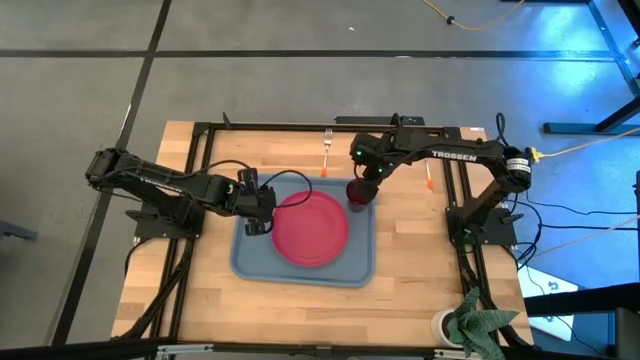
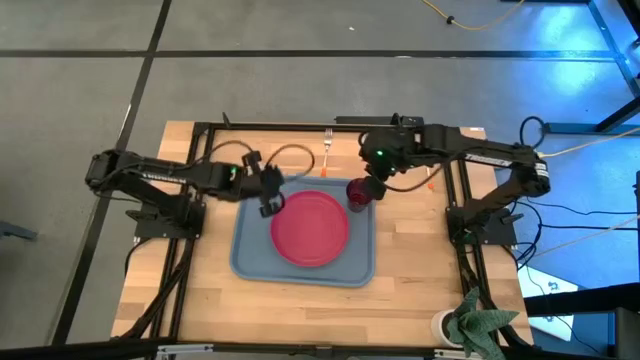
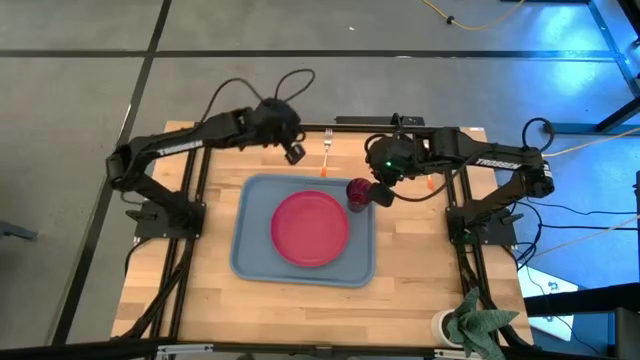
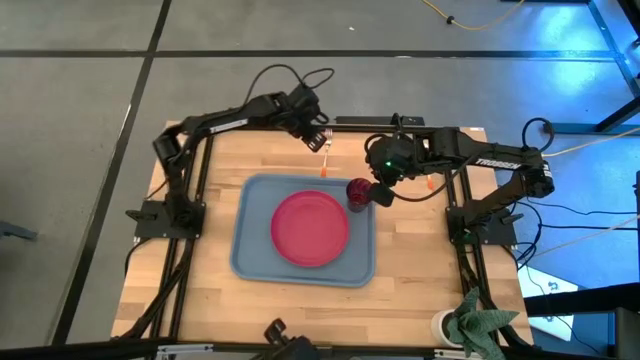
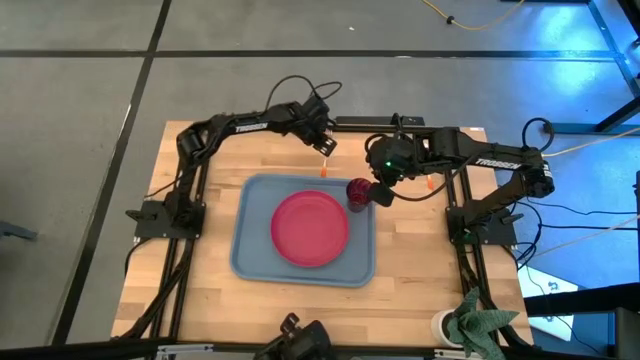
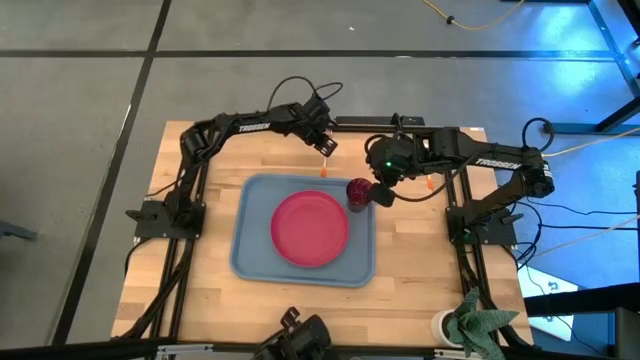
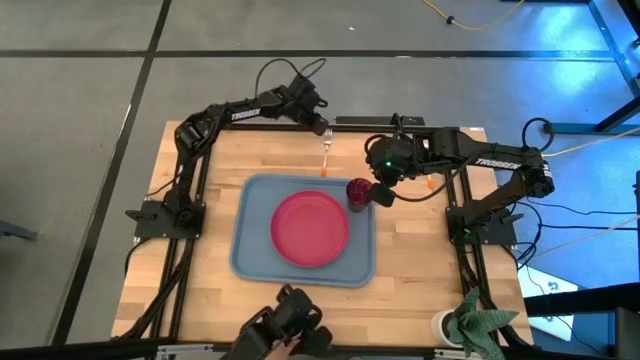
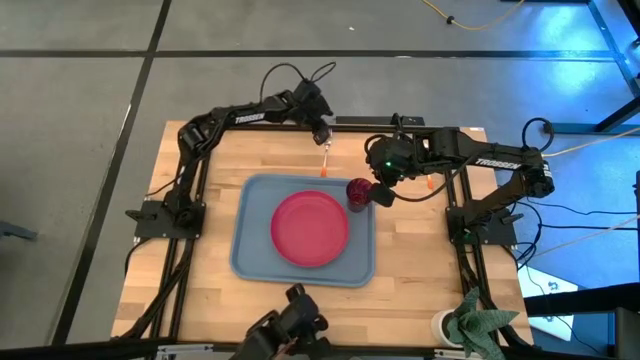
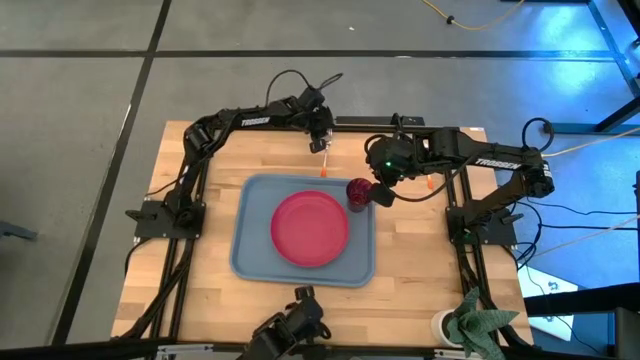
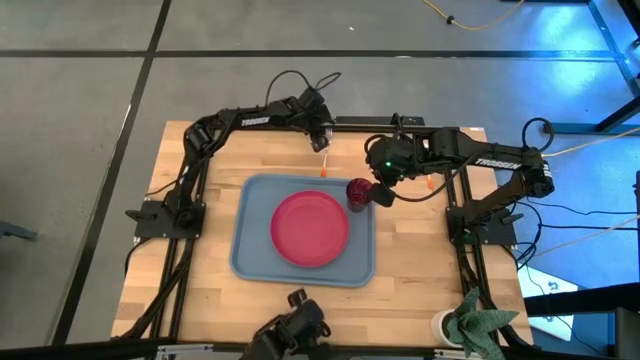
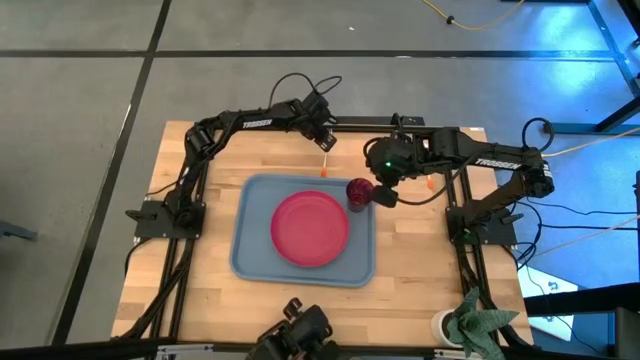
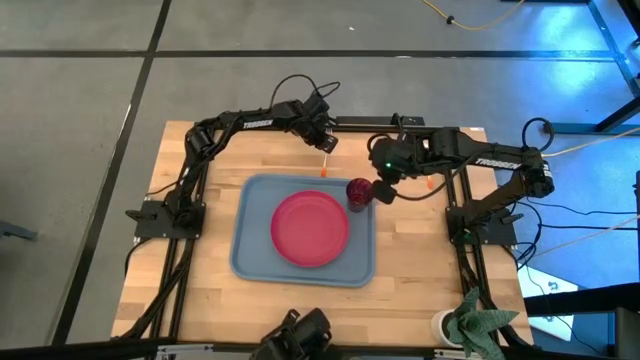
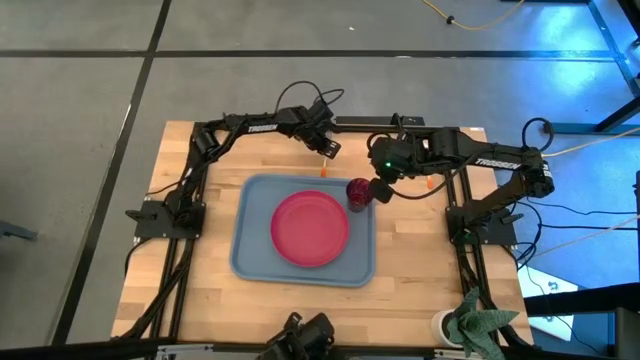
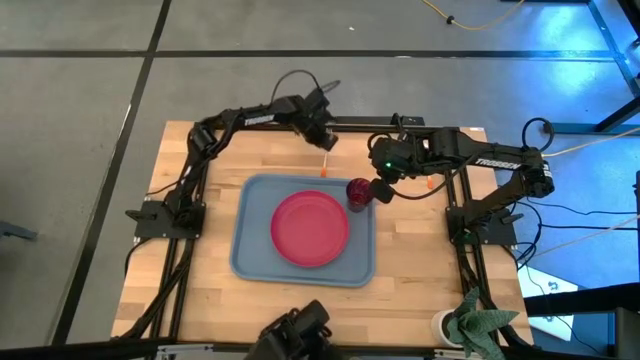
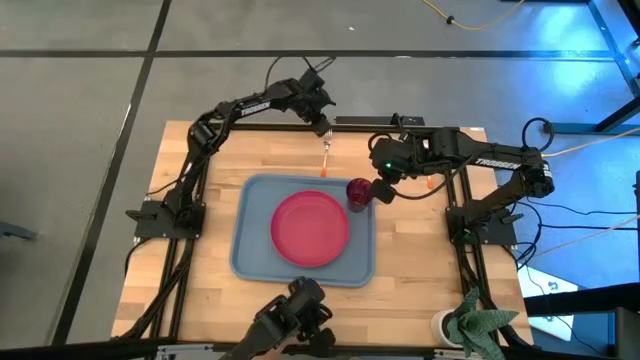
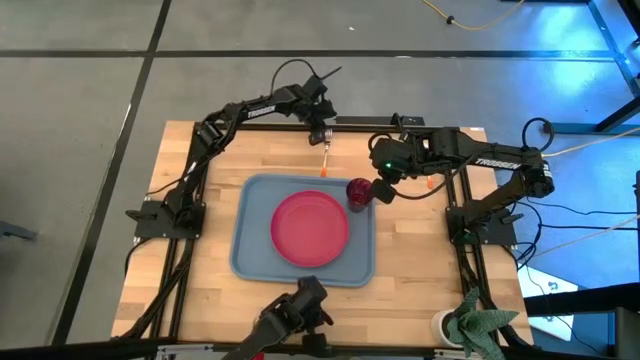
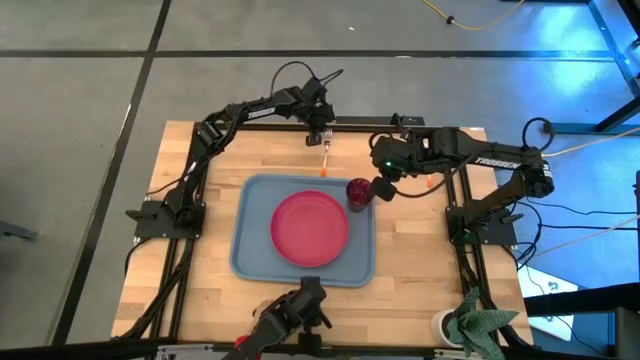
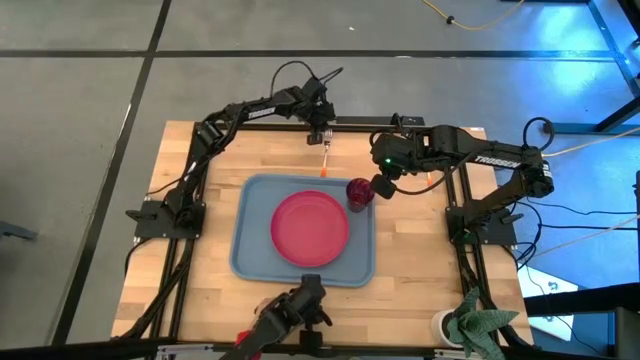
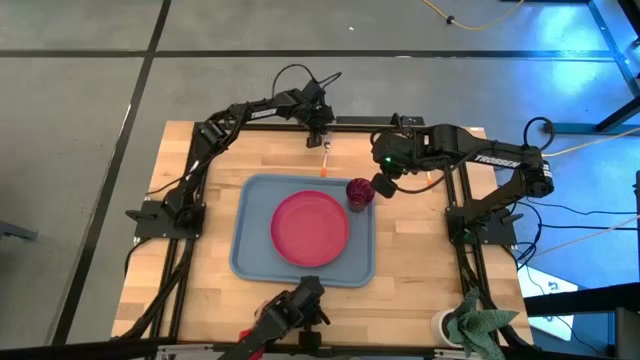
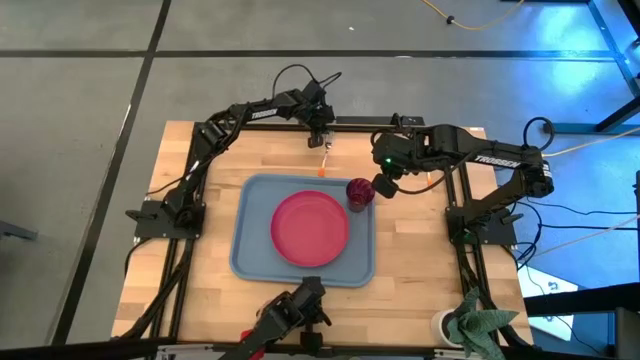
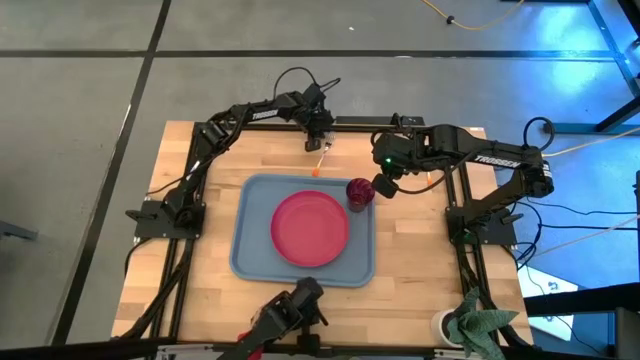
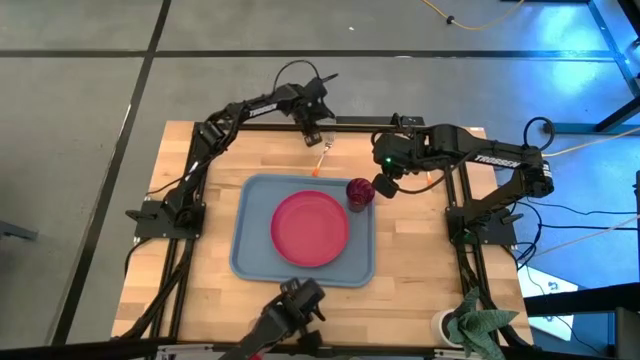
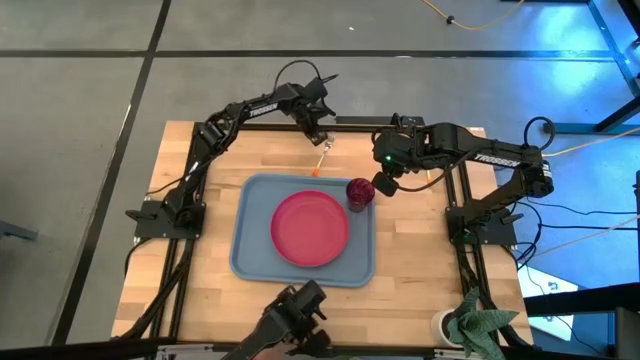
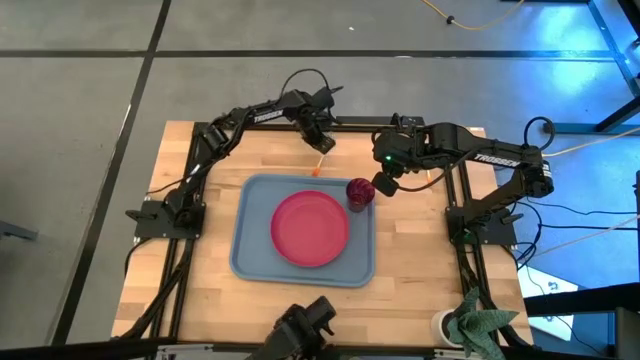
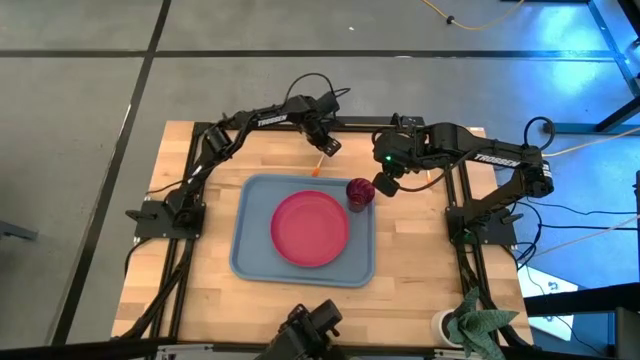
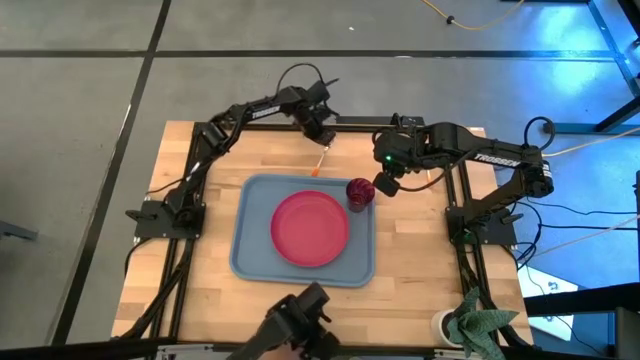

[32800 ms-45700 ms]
Task: Pick and place plate/cup/fork/spoon on tray
Put the orange fork on the blue serving tray to the left of the red plate

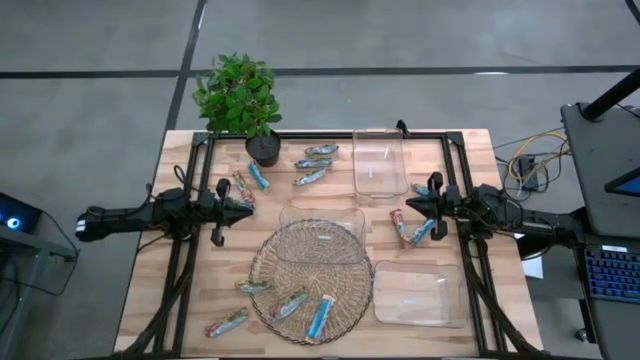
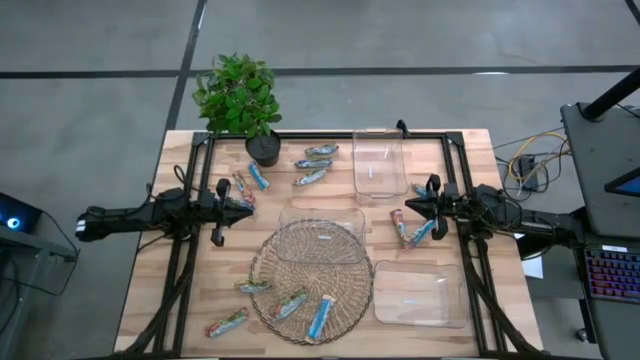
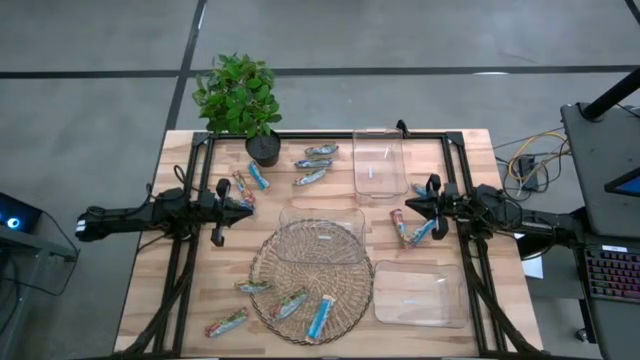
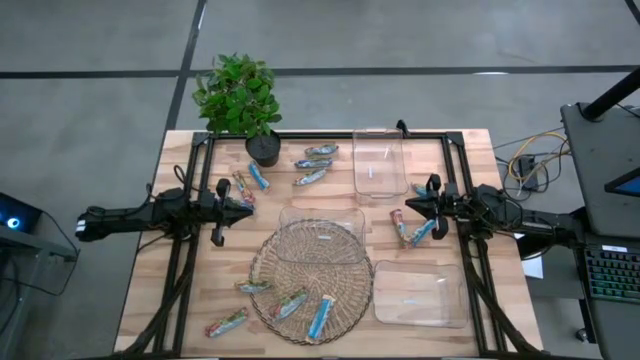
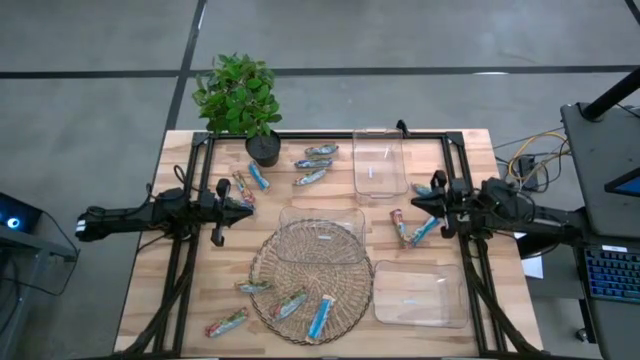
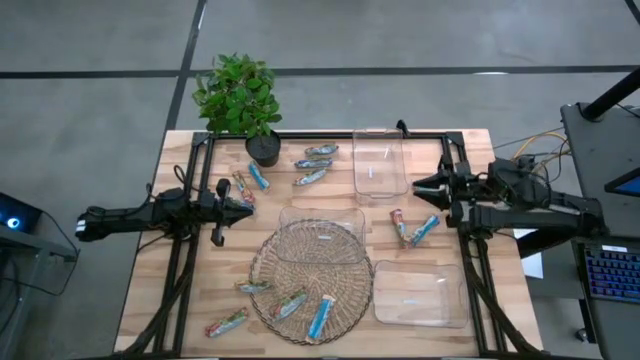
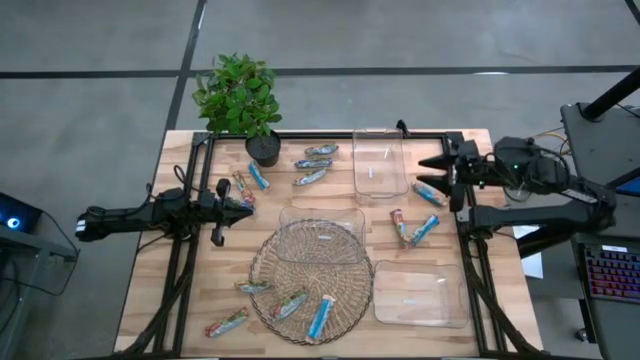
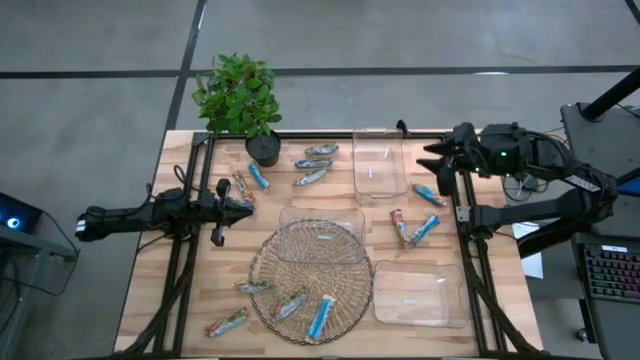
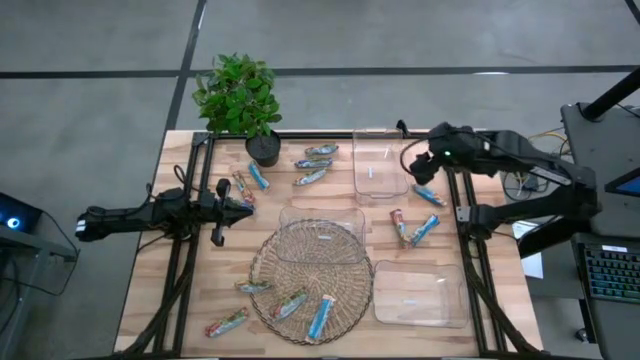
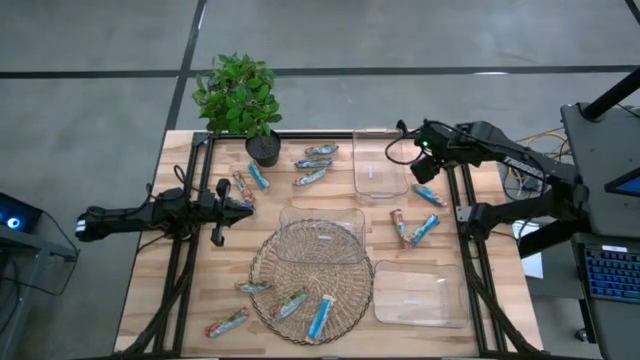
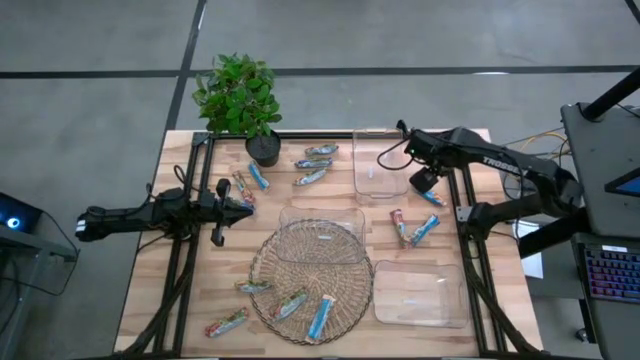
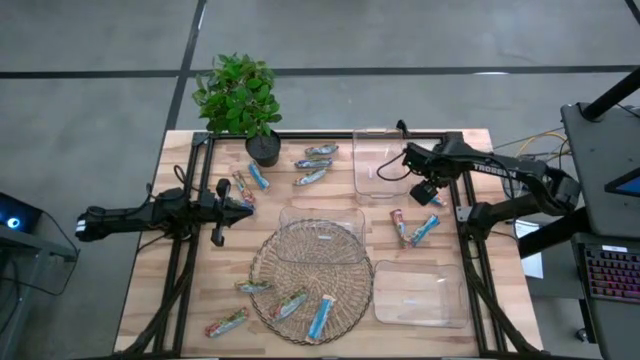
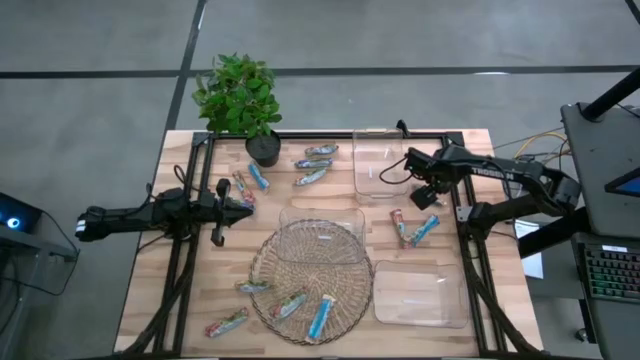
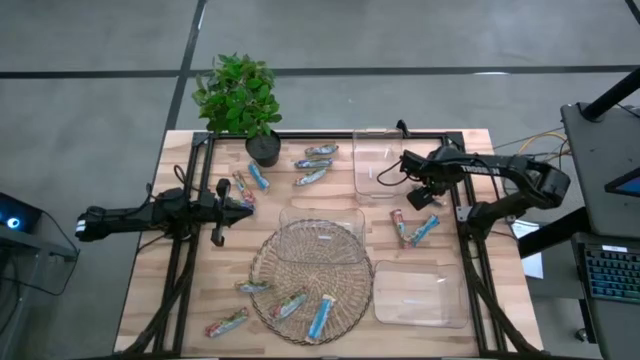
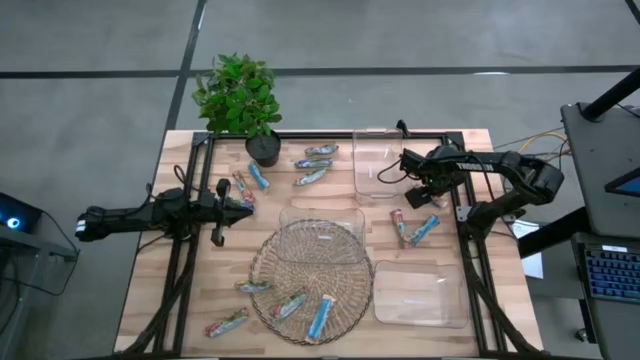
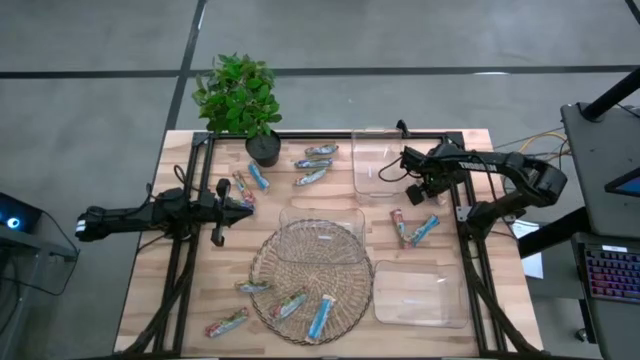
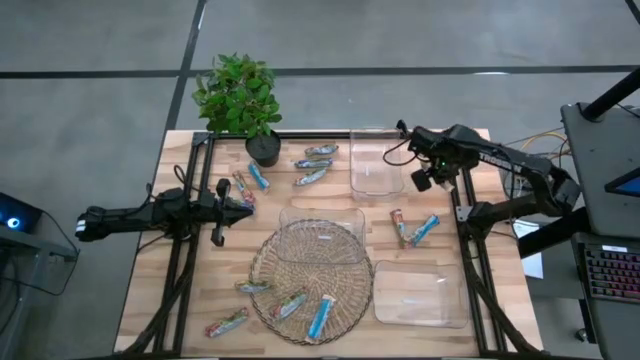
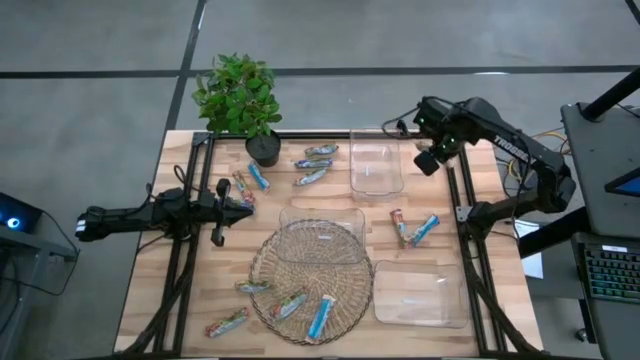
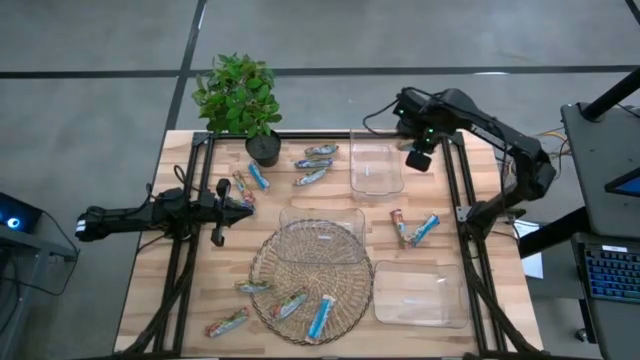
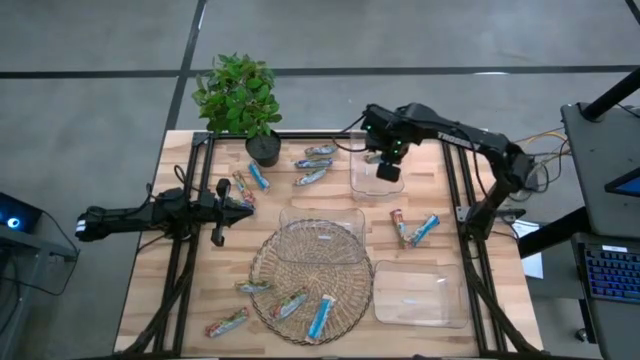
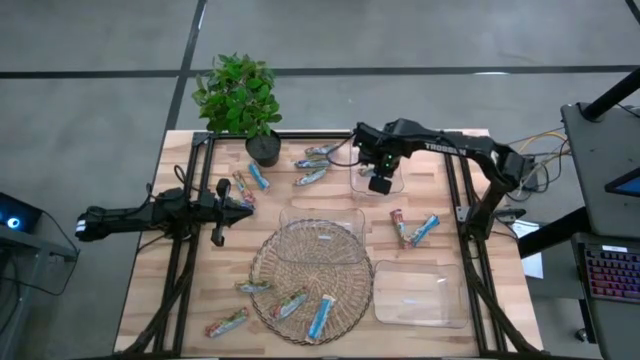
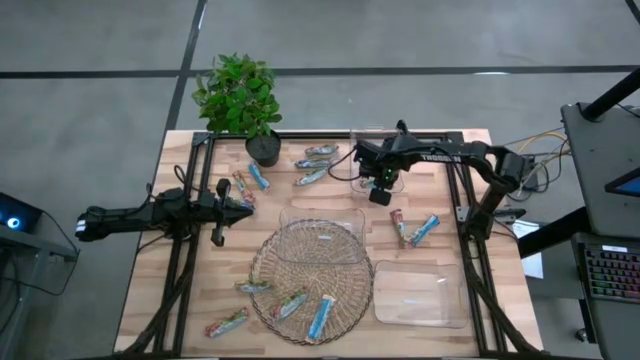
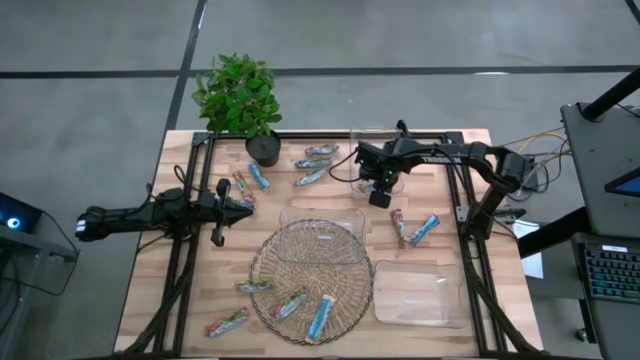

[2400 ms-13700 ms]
Task: Pick and place Granola Bars by type
Put the yellow granola bar into the top transparent bin
